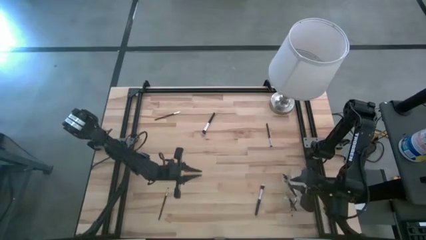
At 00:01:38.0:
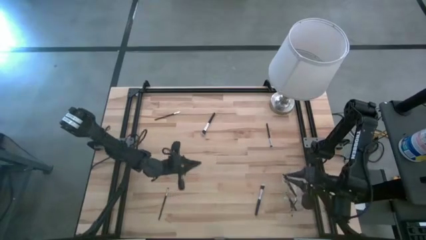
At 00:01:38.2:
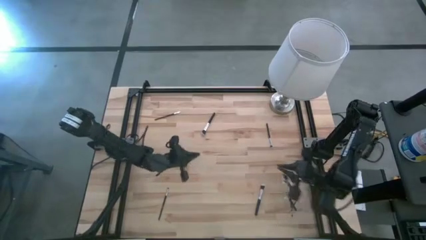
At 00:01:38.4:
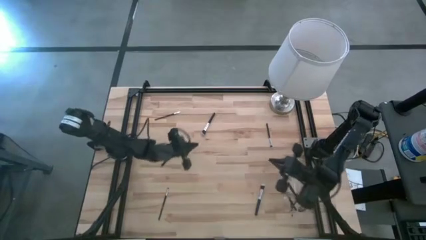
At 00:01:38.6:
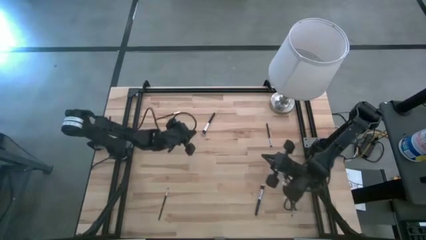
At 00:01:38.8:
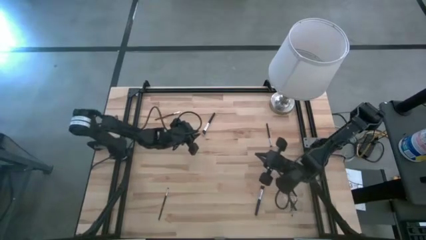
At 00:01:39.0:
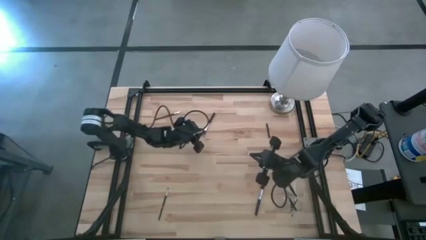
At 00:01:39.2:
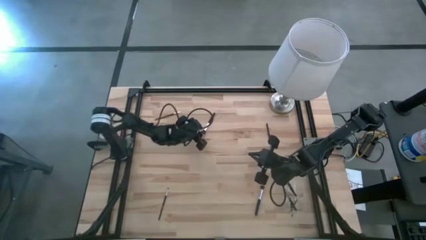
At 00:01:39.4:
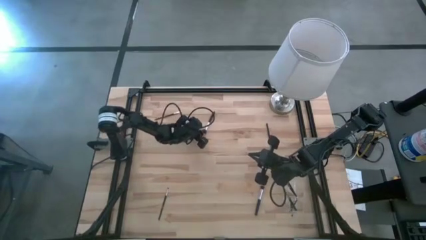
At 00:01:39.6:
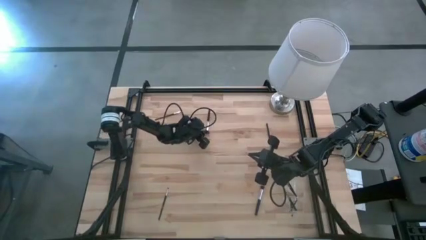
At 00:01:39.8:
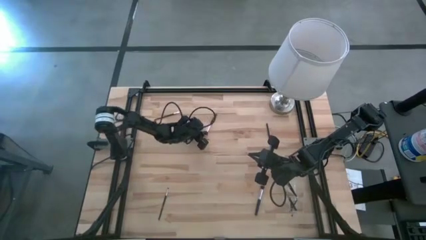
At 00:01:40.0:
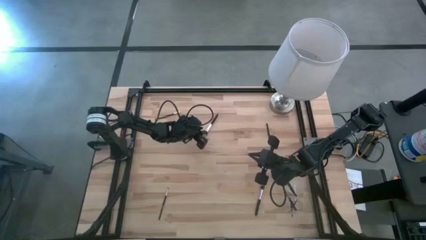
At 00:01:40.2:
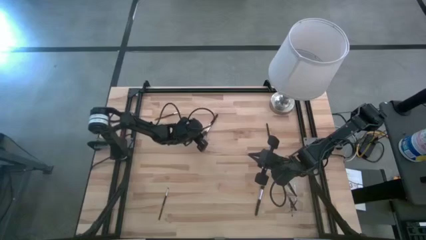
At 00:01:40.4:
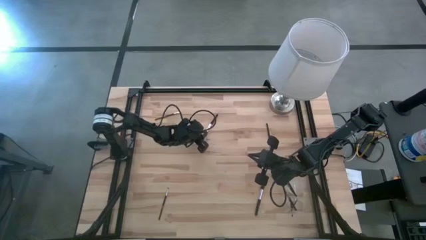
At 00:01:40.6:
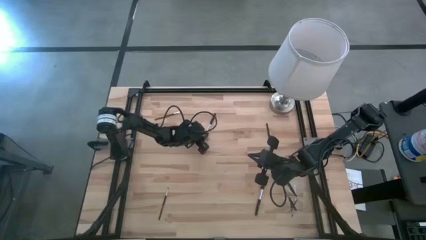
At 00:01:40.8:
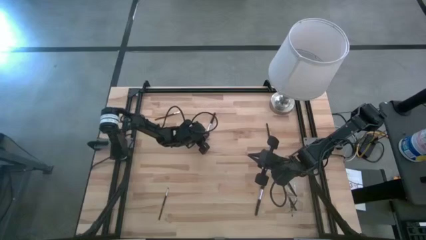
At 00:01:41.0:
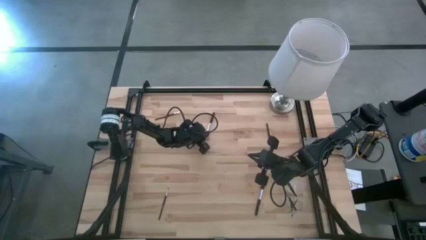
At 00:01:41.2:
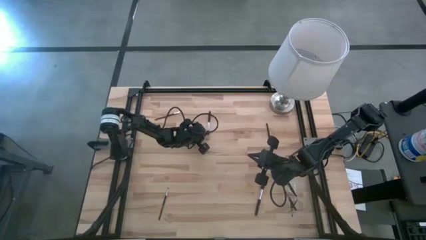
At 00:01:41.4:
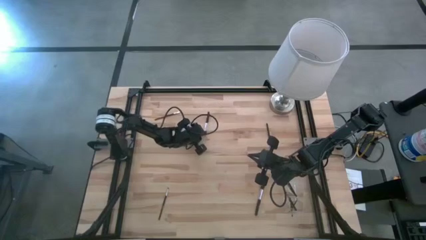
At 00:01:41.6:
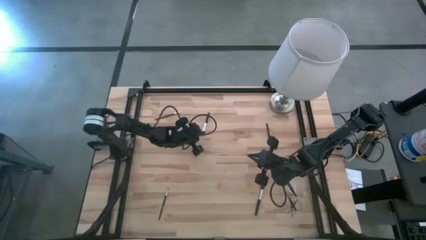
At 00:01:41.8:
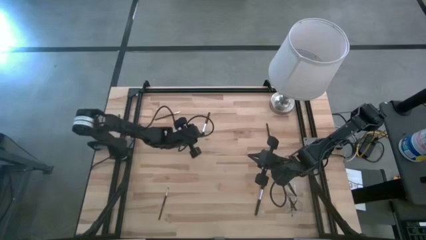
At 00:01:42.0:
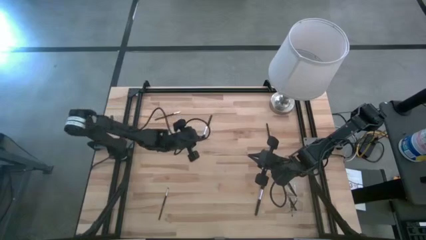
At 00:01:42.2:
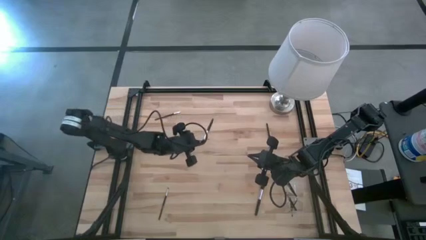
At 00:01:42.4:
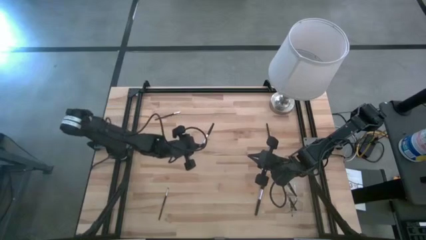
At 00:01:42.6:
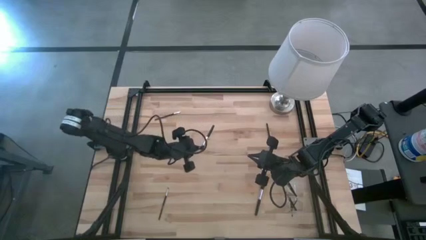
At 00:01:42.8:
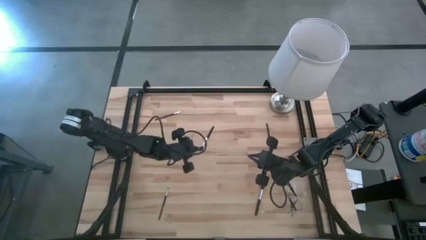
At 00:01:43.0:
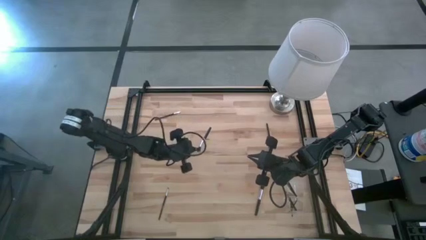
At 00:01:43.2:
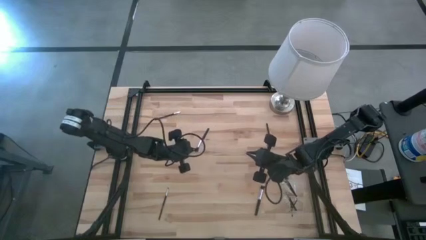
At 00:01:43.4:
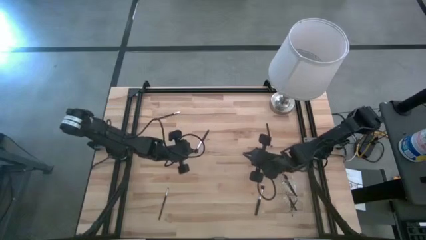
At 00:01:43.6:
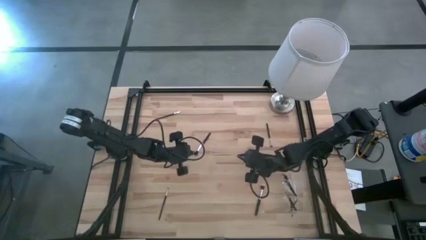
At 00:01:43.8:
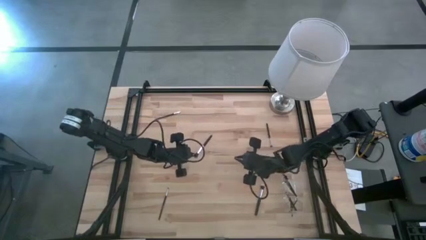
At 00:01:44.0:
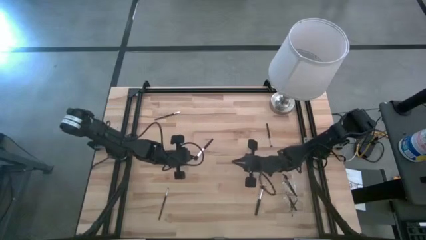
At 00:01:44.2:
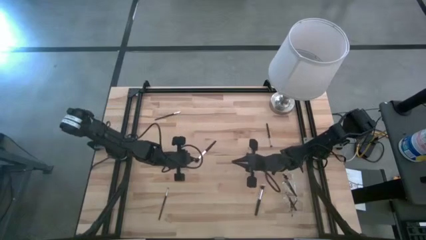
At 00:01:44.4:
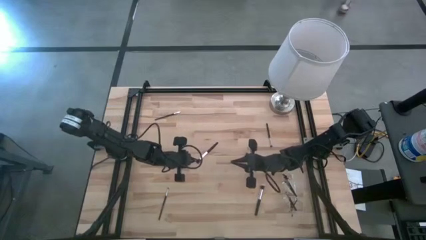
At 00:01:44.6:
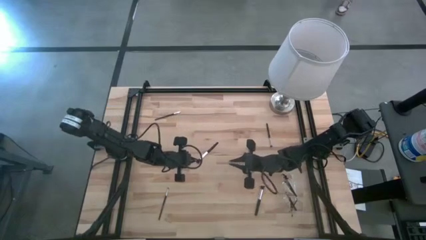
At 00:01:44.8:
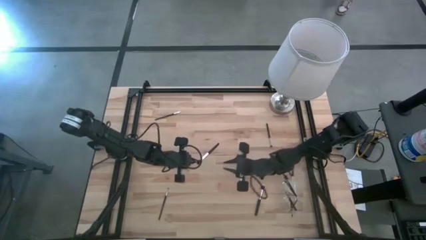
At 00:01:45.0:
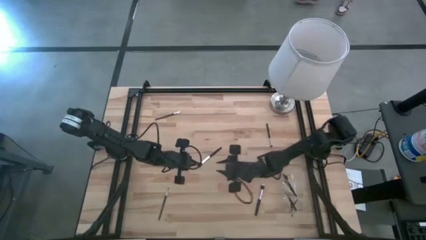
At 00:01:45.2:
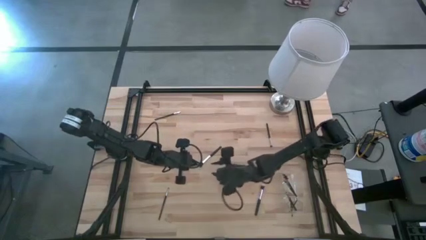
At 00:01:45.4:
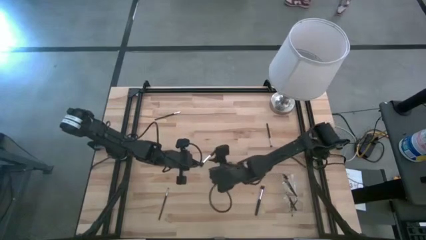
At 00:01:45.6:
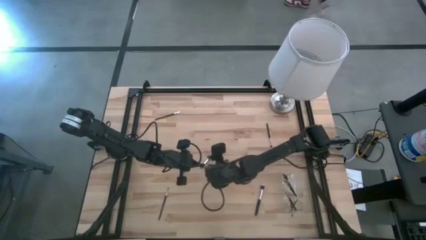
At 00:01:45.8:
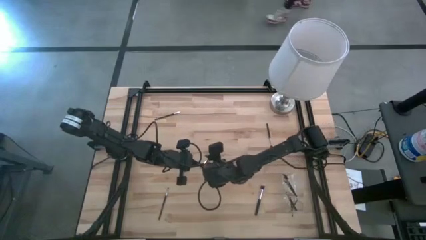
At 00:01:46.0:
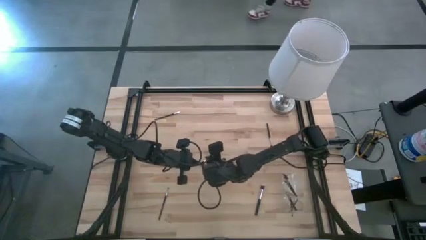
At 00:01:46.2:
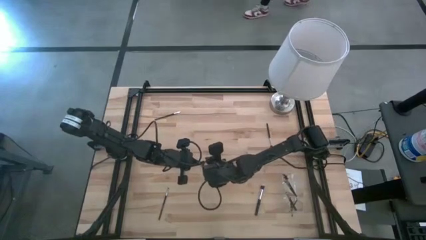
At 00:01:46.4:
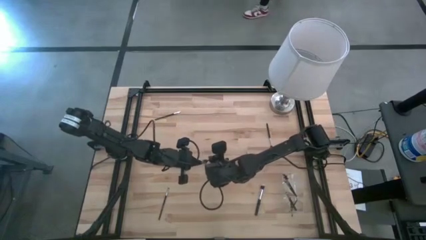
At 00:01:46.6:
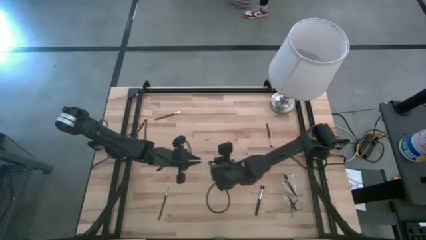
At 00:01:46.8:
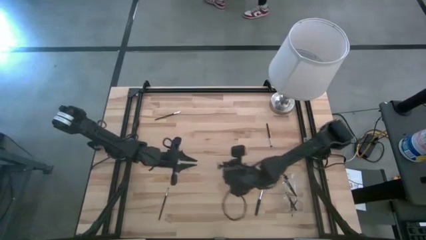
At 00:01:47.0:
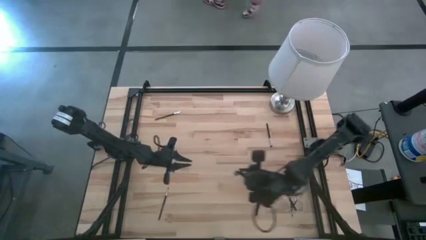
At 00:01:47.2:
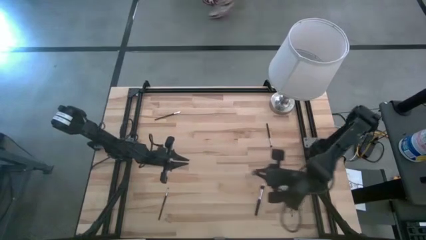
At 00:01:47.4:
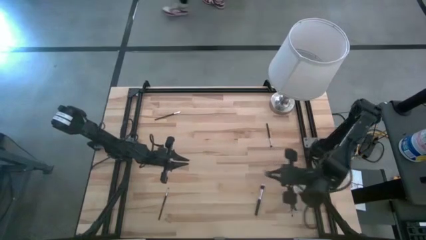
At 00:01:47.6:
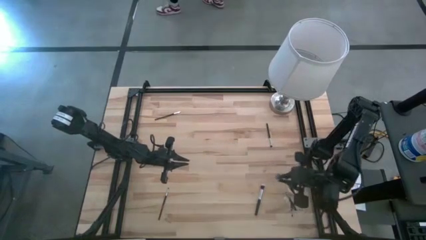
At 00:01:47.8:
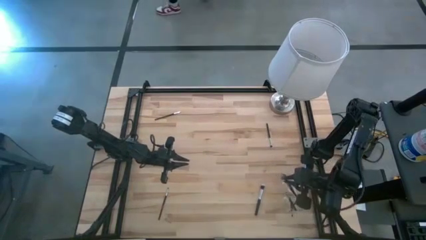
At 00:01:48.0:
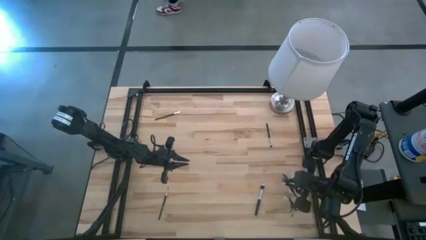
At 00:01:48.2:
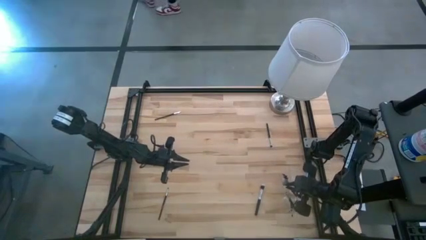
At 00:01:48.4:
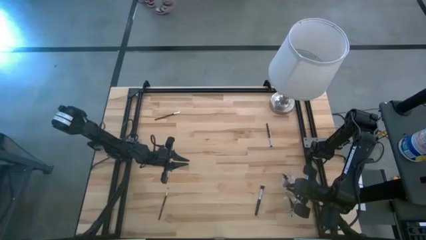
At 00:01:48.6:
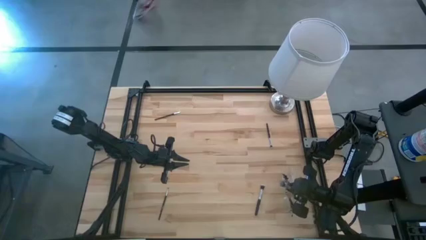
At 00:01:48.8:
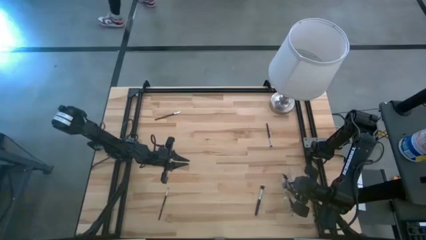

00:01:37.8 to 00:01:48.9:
Task: Put items in baskets/containers
Put the top powder brush into the transparent organizer
